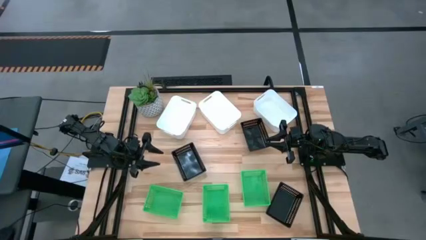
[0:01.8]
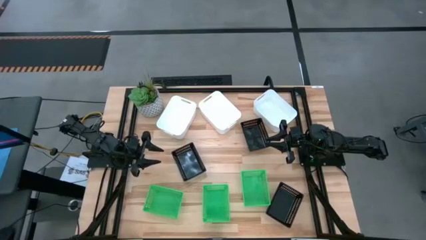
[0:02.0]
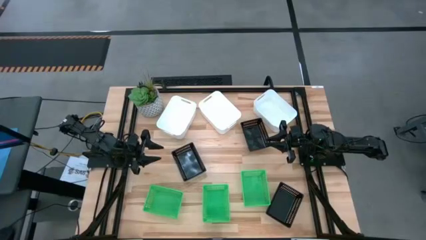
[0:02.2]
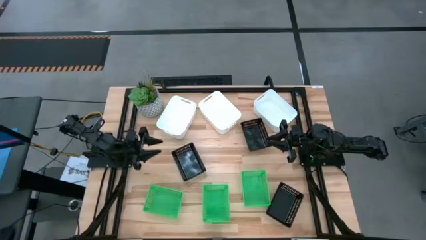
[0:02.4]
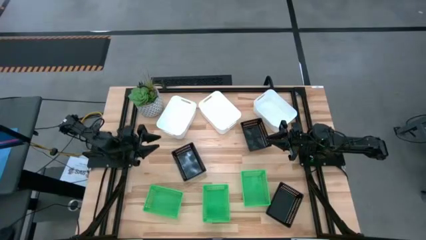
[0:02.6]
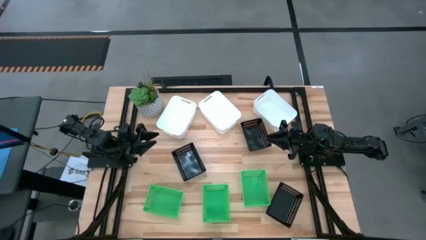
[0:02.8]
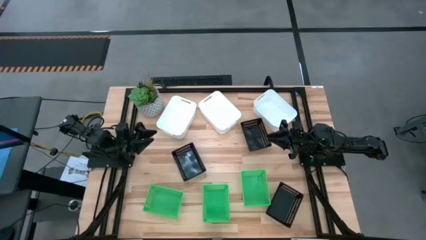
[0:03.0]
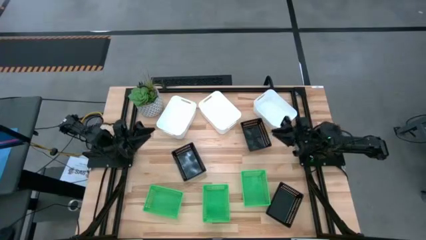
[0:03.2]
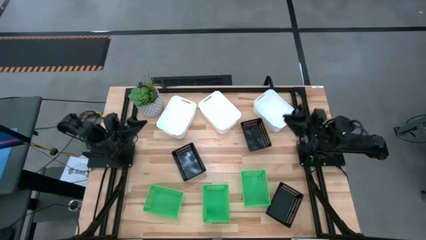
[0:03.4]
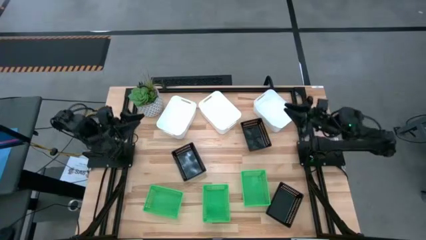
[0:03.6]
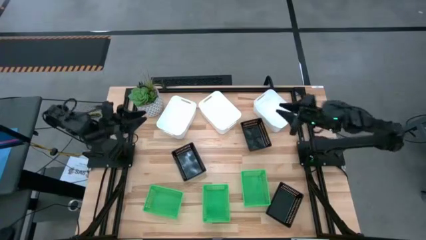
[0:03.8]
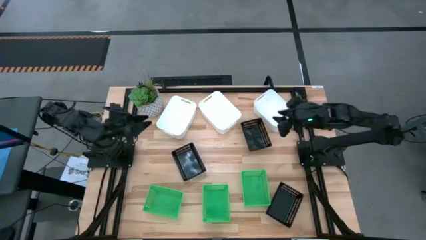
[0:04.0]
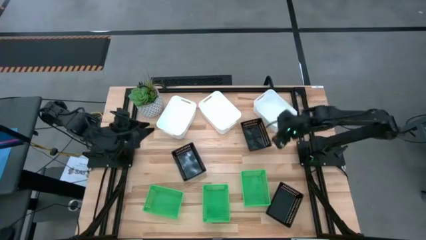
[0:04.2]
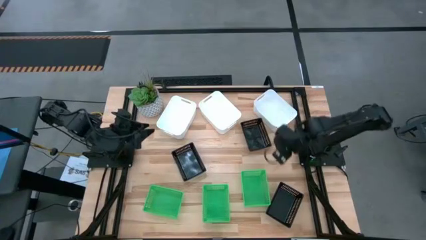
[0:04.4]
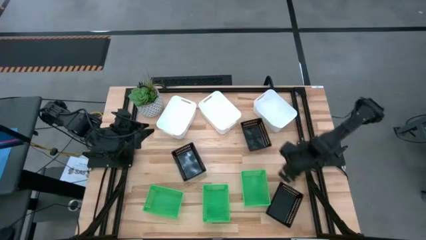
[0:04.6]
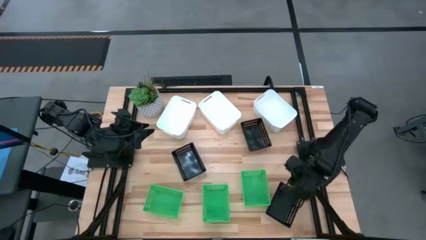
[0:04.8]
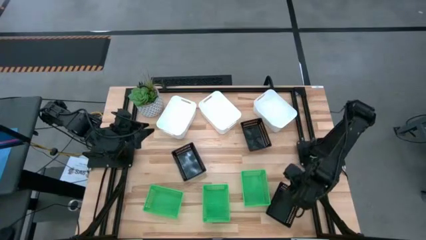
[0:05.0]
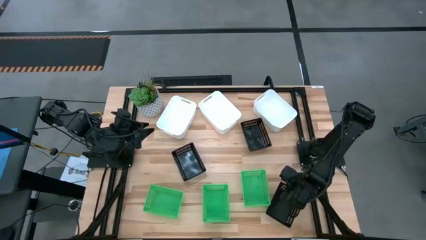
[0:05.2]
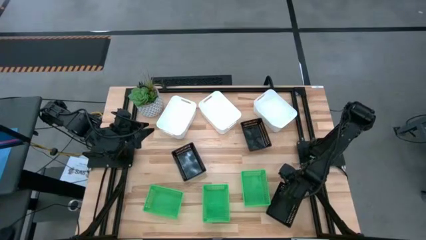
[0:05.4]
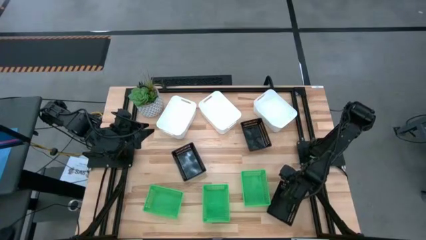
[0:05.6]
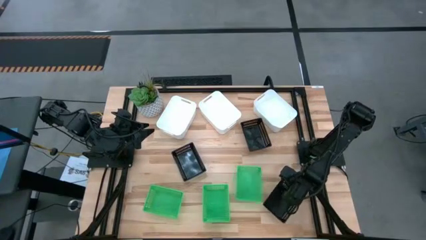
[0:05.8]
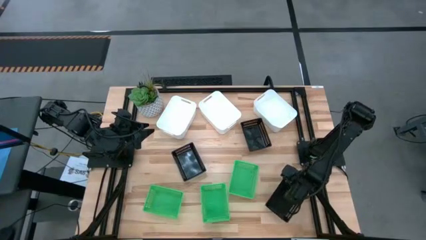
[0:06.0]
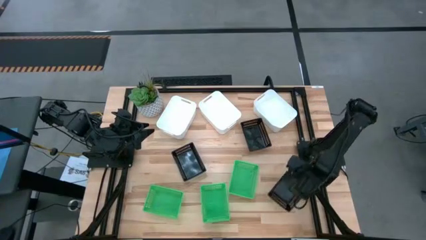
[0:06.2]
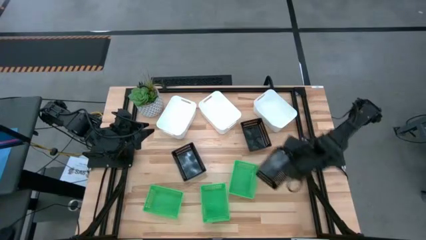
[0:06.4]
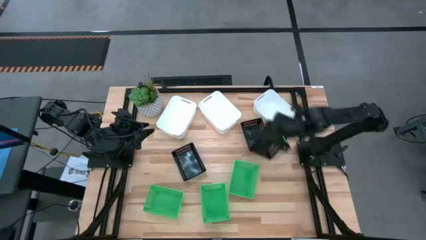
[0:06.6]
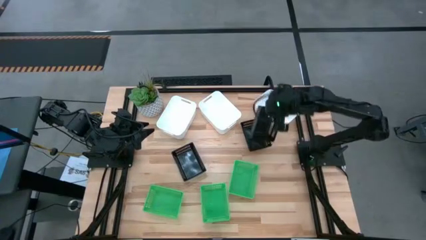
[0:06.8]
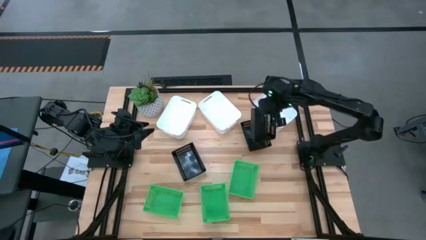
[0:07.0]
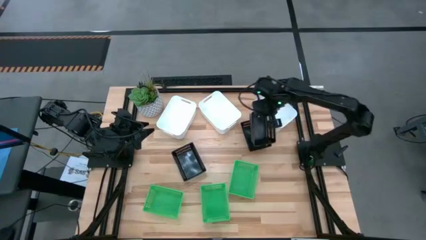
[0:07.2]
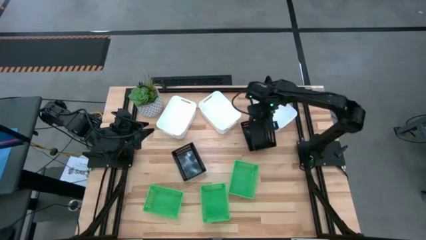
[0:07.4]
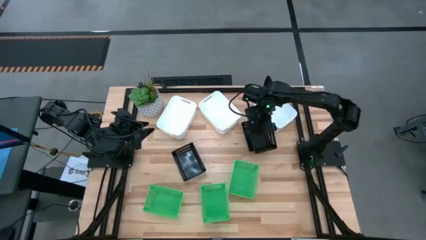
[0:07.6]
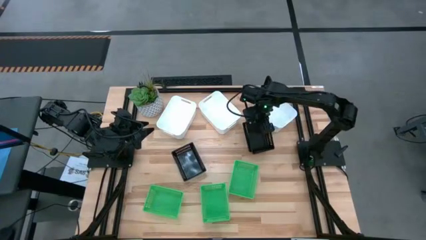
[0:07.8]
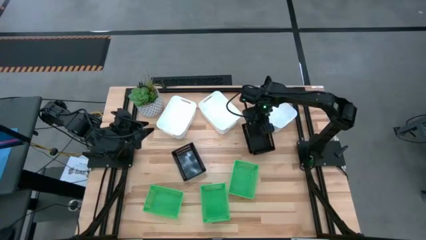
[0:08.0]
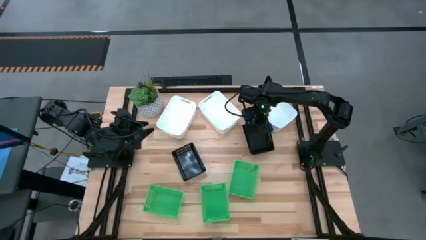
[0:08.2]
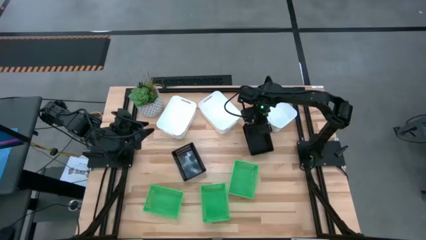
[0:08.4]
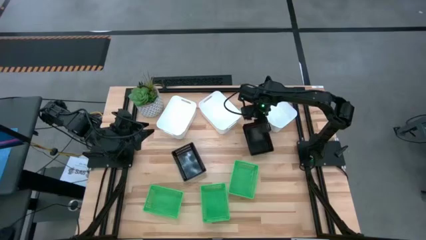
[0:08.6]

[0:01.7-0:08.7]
Stack the bottom right black bin on the top right black bin

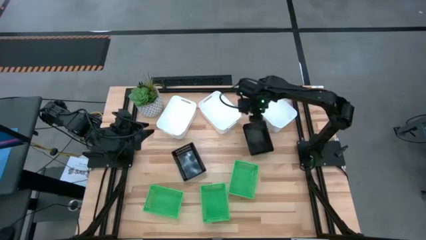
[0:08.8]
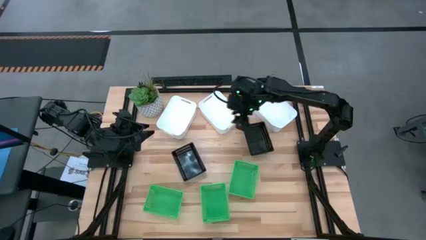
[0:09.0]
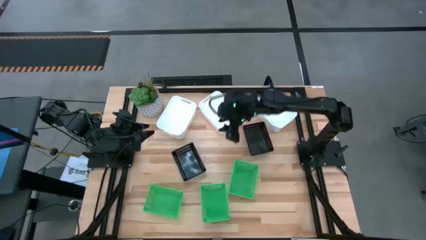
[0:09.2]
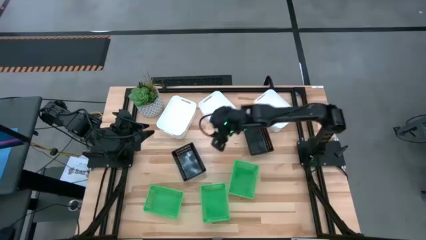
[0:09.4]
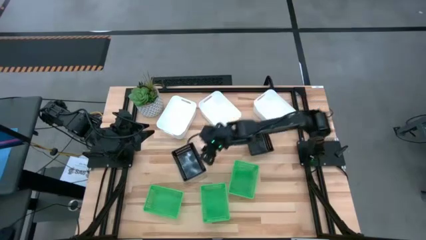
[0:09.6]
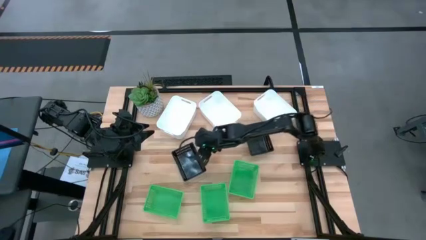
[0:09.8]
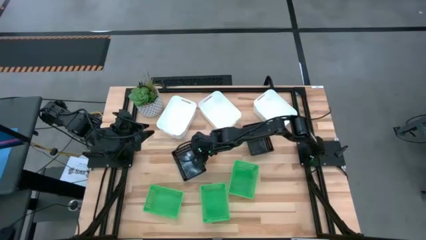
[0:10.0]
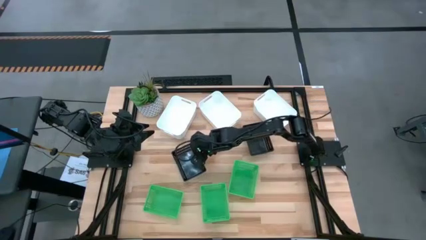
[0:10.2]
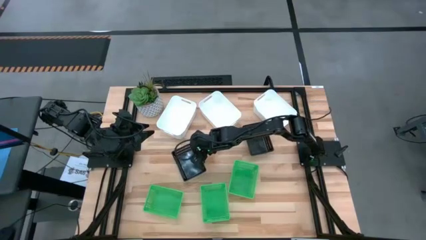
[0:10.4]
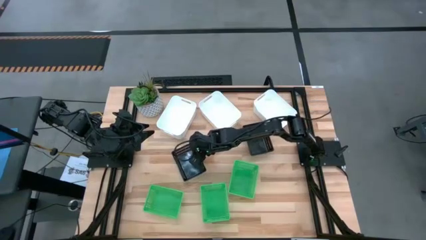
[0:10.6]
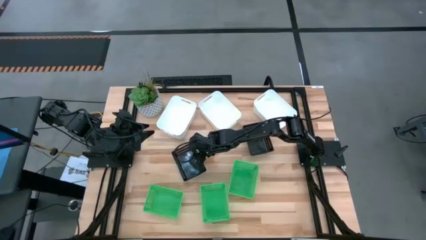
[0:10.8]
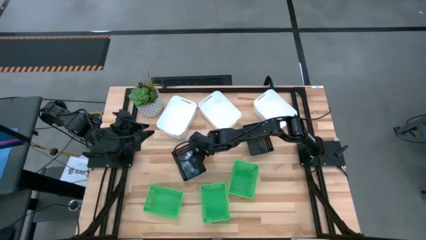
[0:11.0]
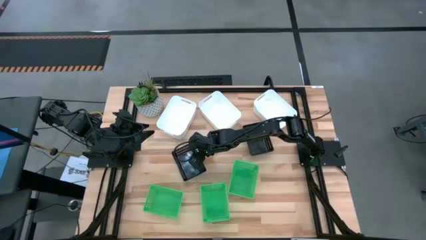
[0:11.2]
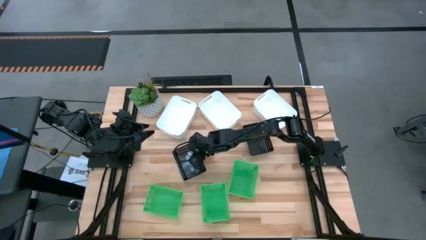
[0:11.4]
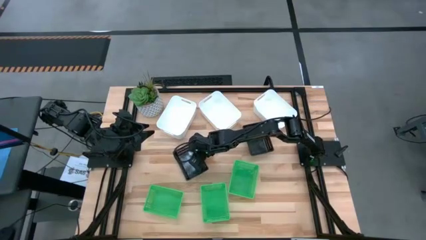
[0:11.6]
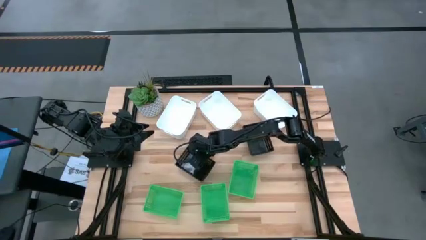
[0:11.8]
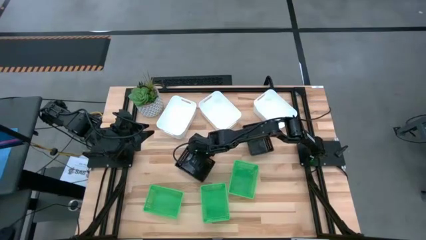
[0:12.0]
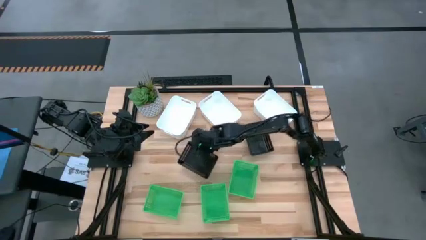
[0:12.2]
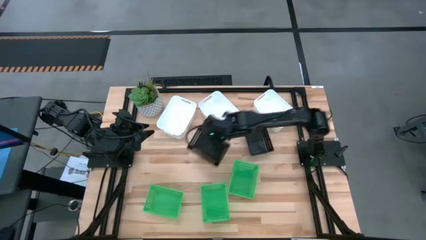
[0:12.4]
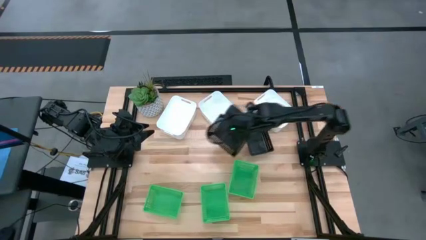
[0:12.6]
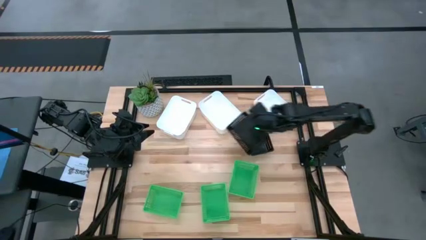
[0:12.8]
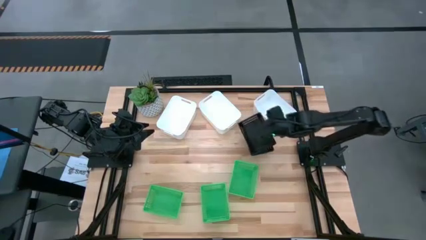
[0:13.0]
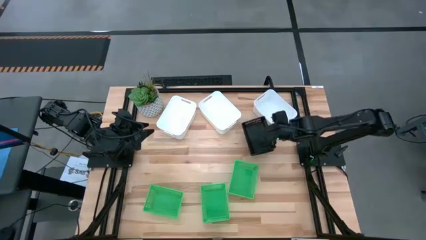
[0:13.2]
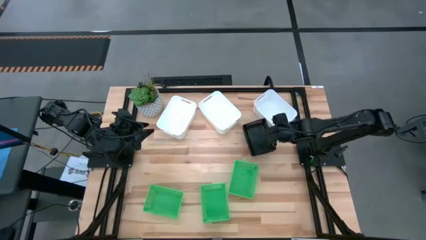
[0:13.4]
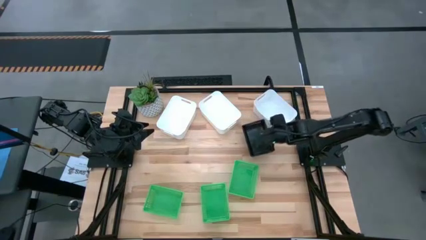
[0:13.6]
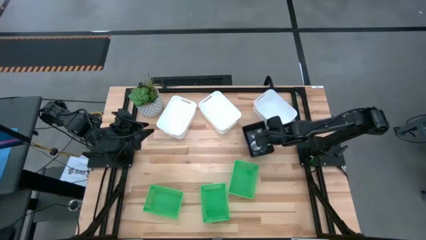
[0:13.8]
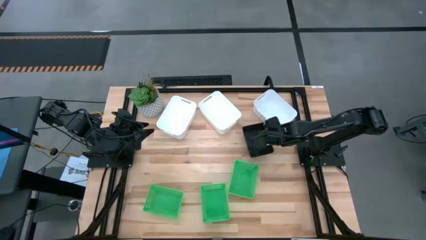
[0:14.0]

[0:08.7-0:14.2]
Stack the left black bin on the black bin

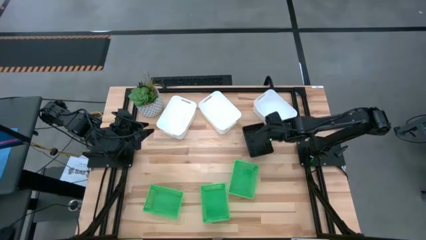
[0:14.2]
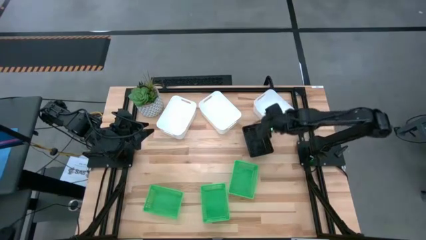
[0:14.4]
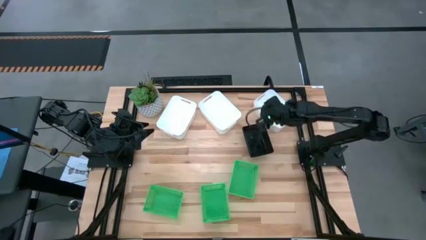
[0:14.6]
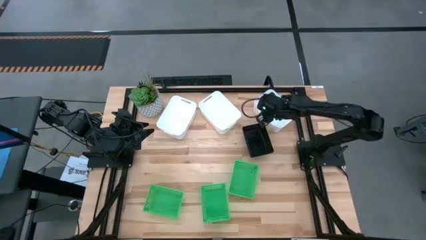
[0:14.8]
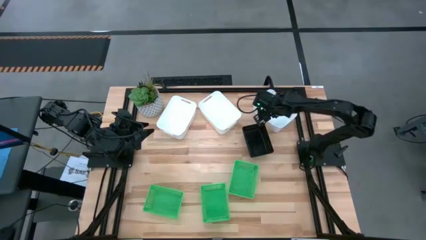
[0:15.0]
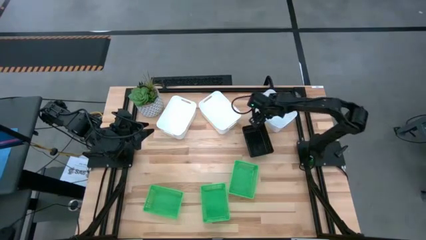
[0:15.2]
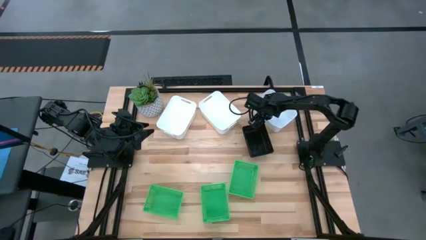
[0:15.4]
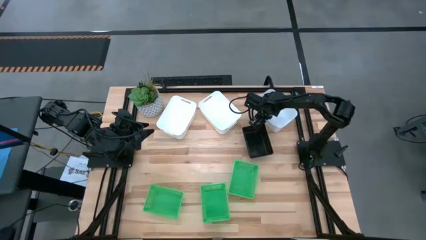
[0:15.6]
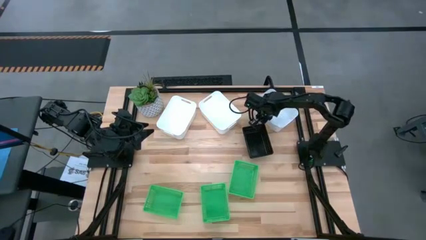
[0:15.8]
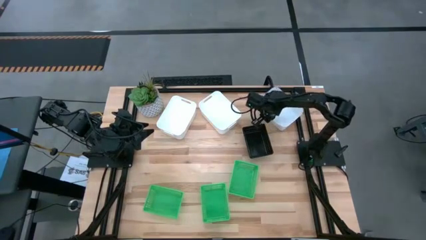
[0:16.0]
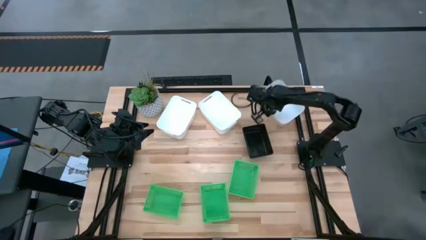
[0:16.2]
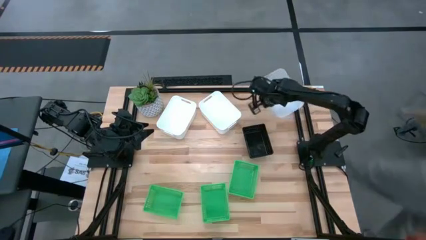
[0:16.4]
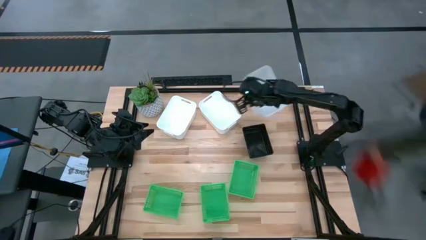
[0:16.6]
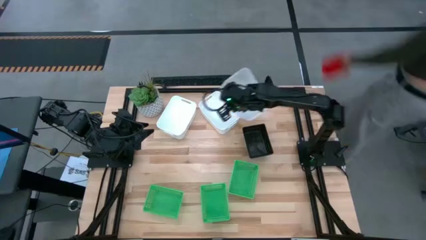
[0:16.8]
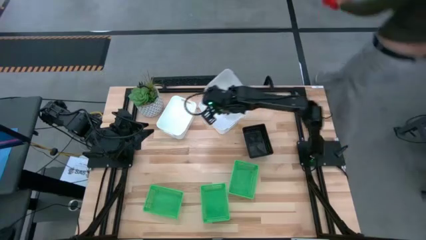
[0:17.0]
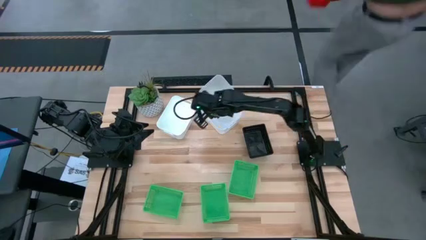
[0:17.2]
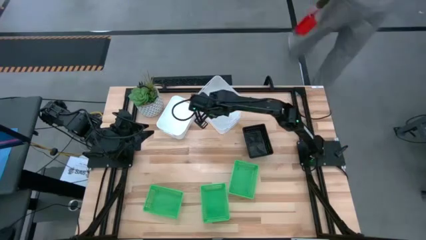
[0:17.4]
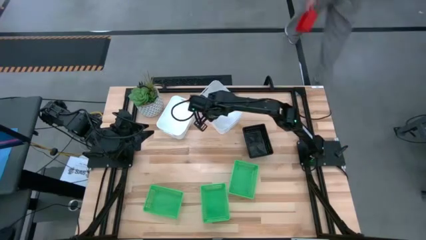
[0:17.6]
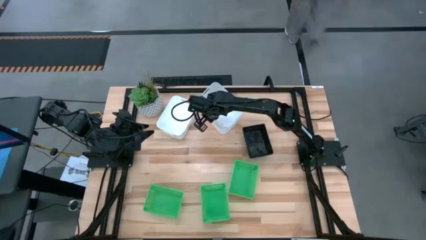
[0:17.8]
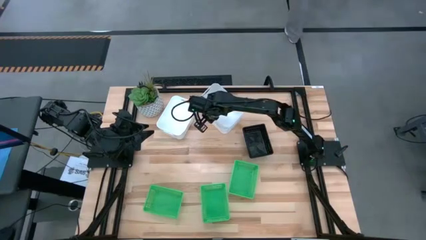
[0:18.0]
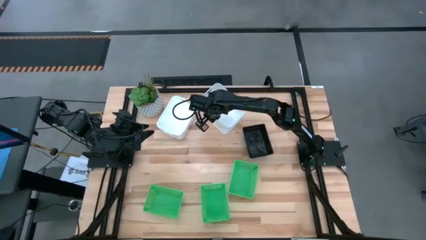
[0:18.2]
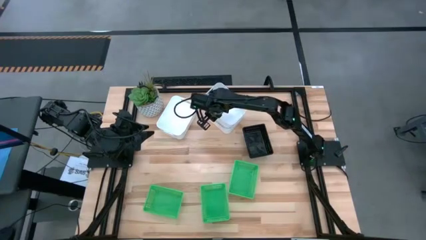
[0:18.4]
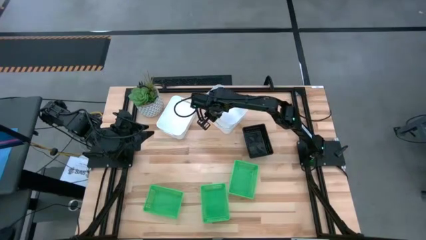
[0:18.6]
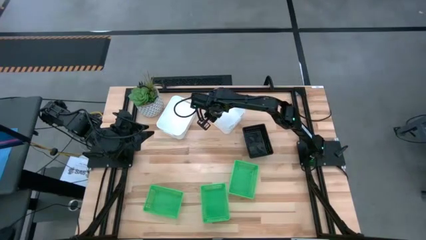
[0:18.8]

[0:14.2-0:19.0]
Stack the right white bin on the center white bin
